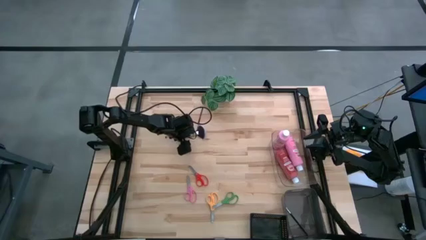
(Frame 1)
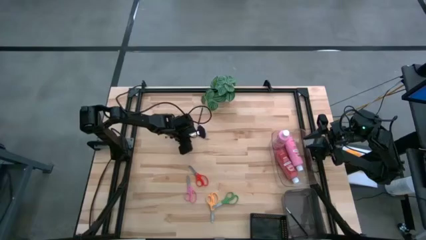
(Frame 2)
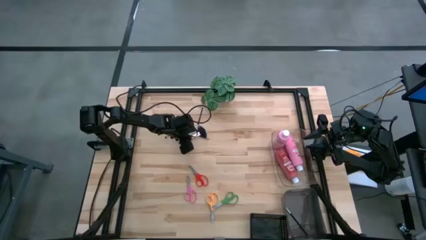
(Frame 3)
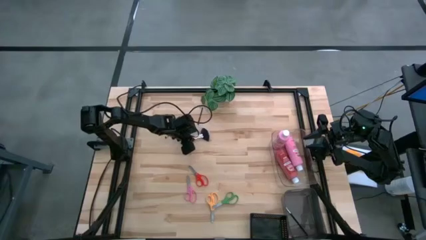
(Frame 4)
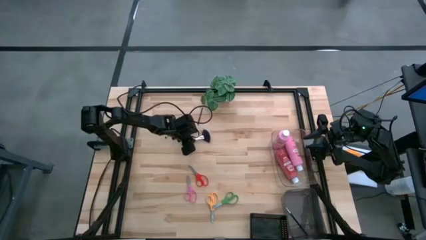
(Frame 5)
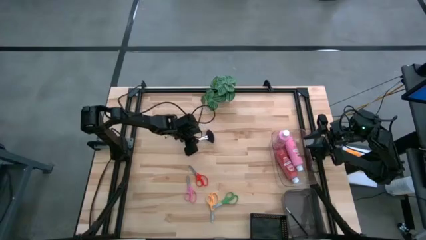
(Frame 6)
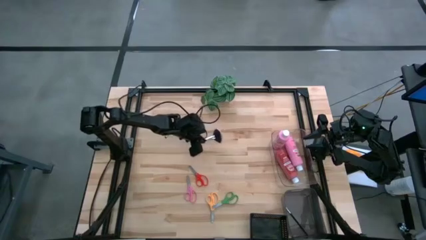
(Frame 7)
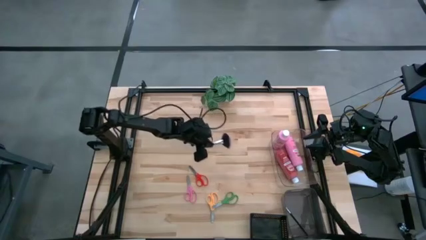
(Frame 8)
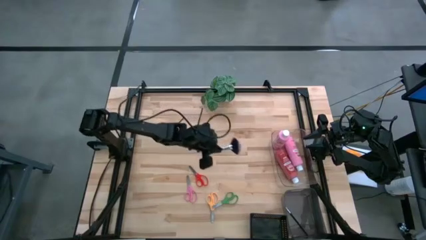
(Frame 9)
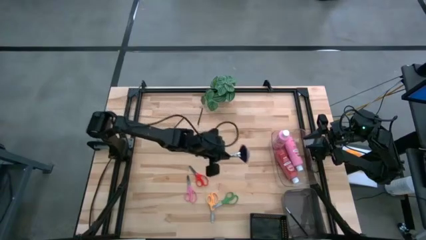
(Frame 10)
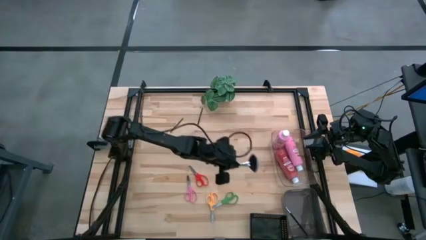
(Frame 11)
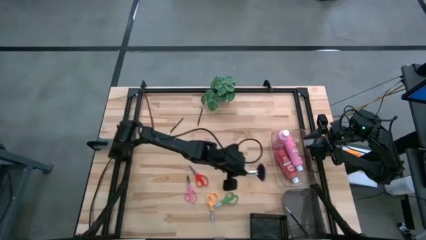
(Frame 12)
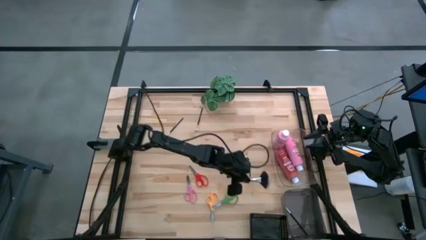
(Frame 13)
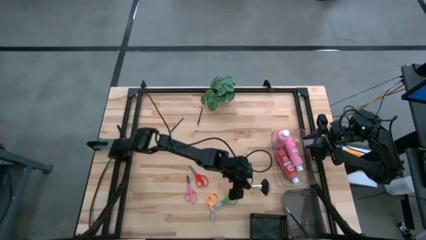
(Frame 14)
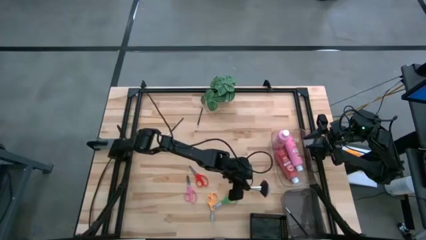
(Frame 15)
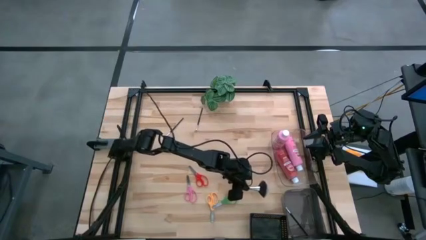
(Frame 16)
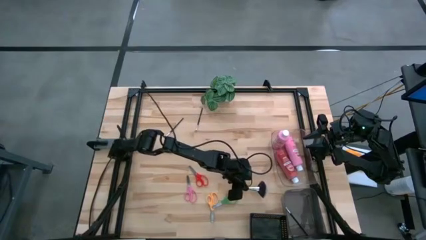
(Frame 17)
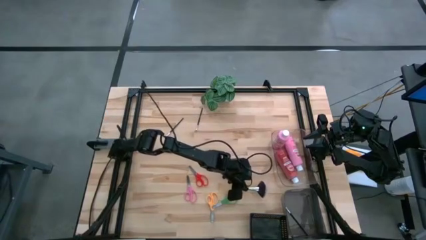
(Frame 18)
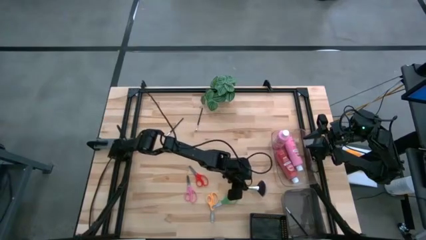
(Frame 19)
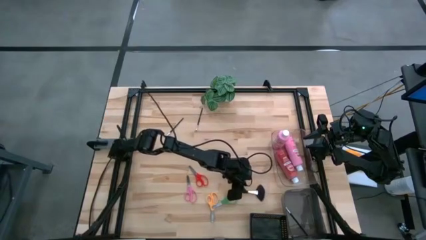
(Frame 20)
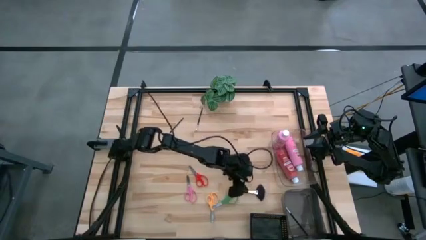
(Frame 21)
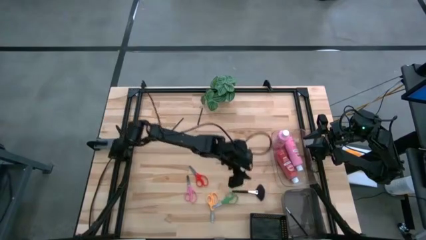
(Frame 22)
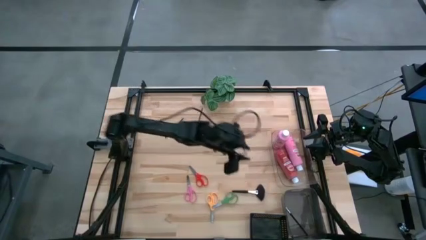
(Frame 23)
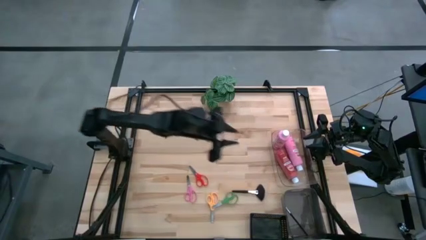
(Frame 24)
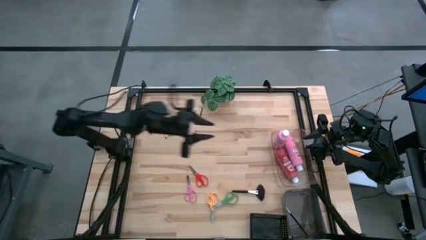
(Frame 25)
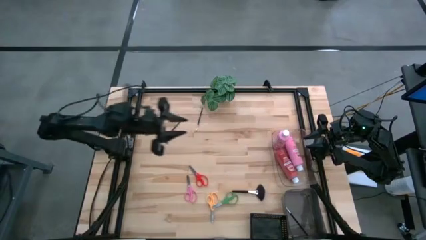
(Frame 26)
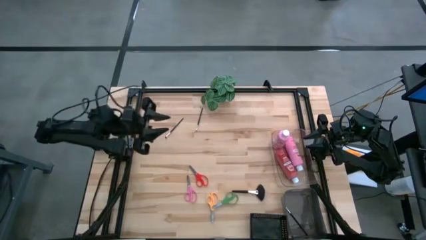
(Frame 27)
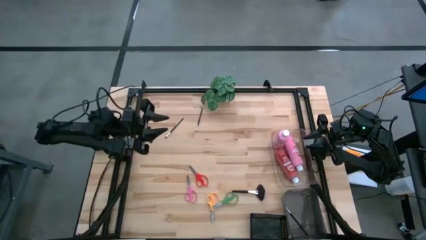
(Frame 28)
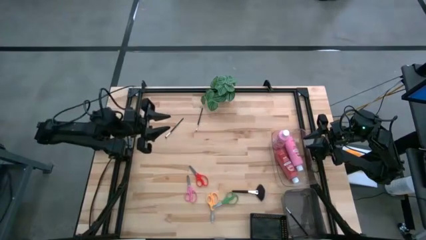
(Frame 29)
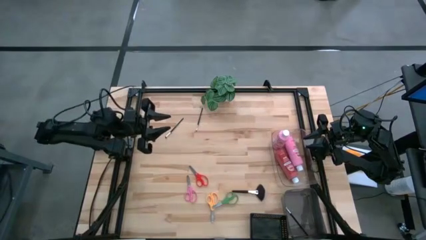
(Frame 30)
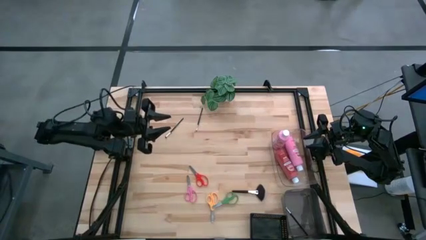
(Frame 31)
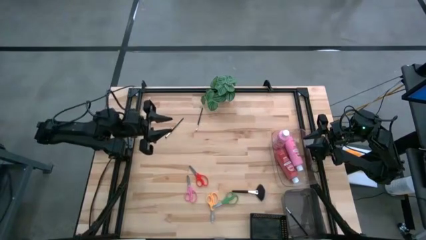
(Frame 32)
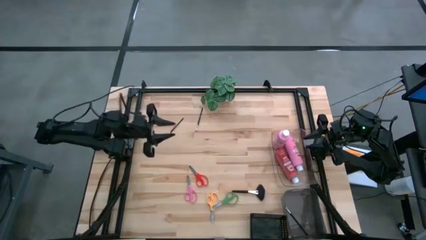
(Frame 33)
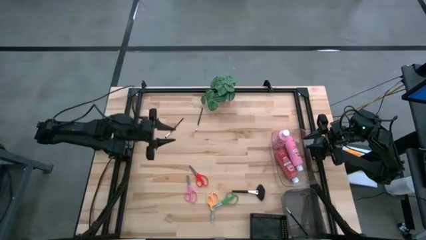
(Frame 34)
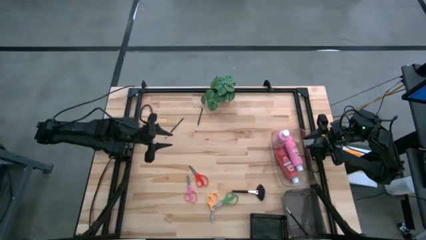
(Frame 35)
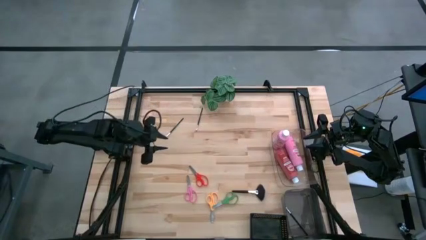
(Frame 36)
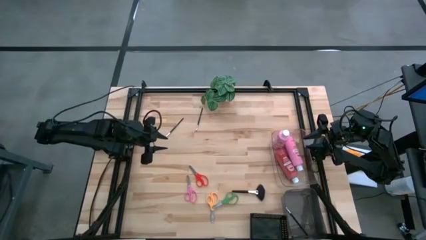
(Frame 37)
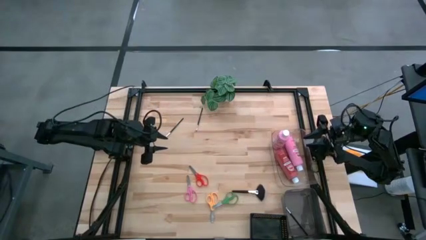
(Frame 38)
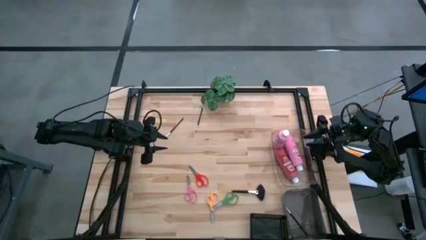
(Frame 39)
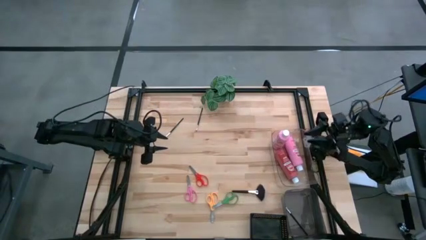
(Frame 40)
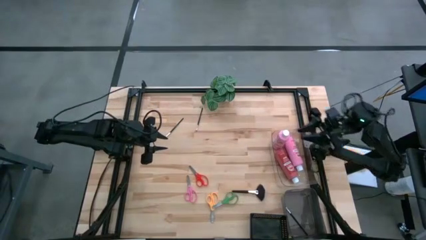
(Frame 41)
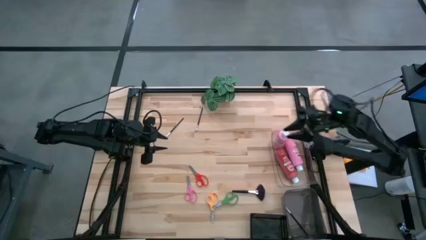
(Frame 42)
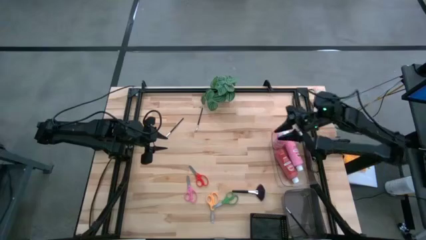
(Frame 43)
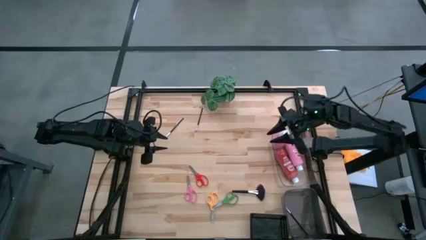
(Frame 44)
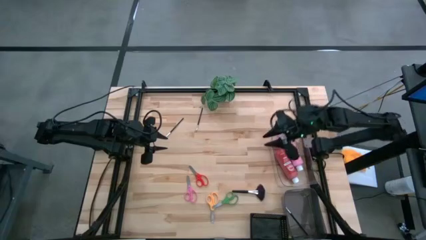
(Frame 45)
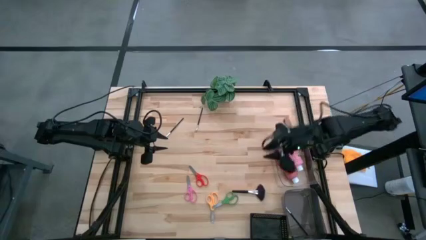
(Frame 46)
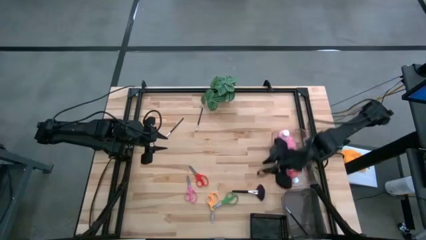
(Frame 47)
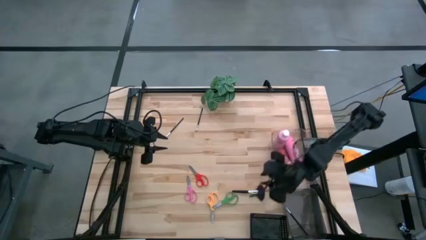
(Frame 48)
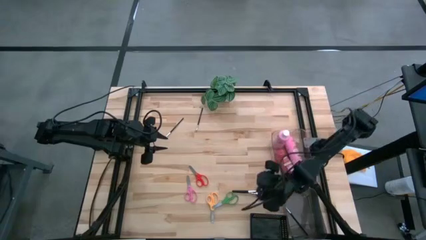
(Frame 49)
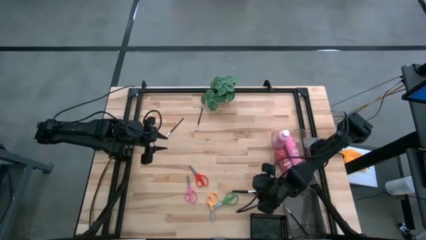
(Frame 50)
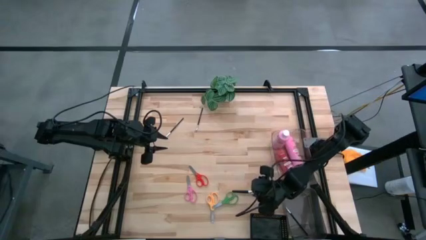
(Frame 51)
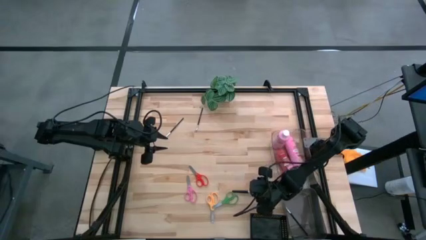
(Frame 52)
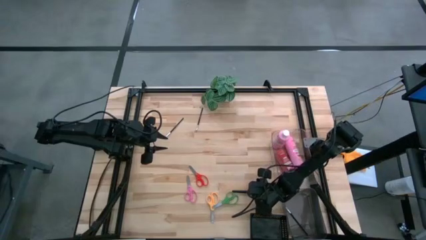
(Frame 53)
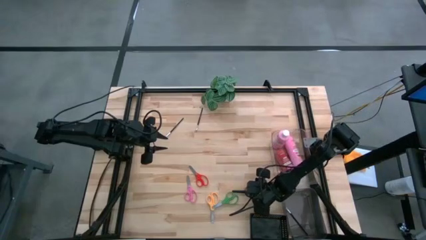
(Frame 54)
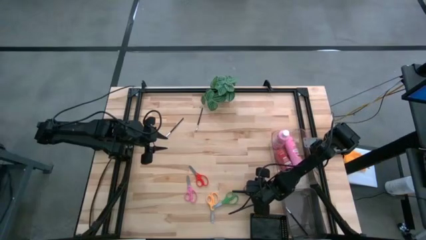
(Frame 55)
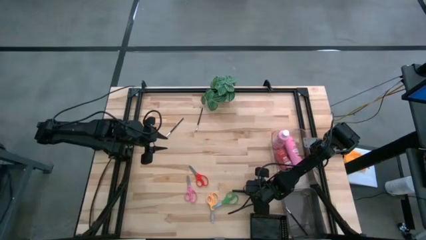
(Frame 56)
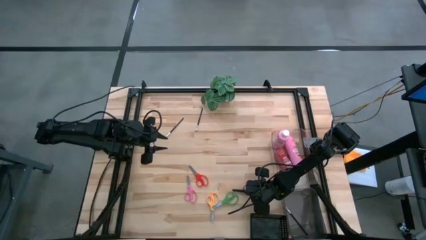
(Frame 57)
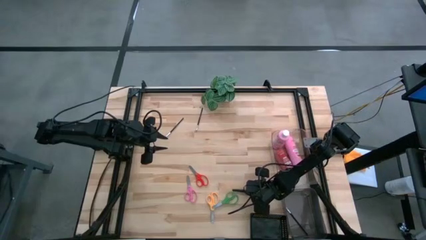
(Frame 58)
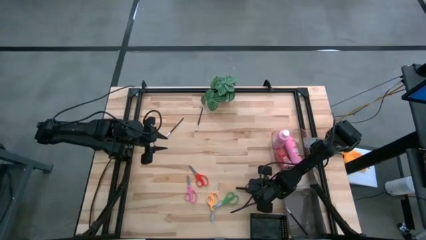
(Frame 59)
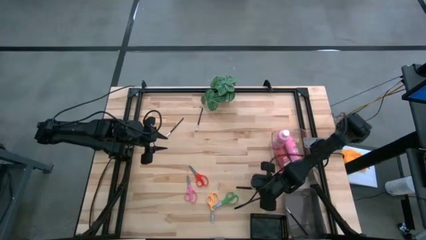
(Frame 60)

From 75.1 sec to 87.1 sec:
Task: Pick & Place Paint Supplies
Put the black paint brush into the gray bin

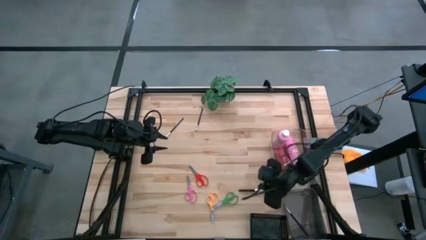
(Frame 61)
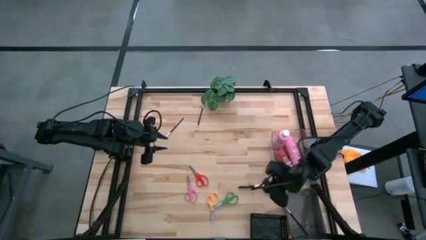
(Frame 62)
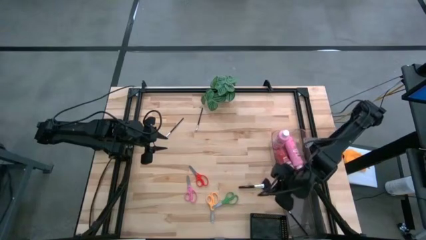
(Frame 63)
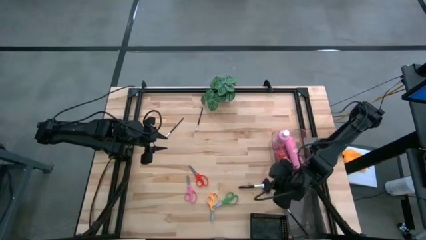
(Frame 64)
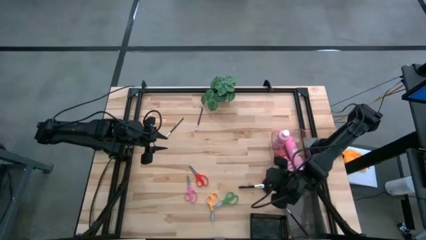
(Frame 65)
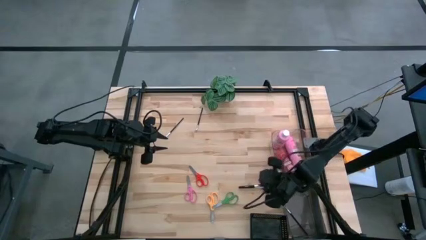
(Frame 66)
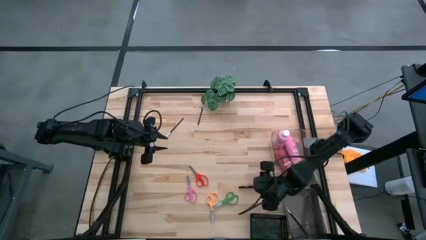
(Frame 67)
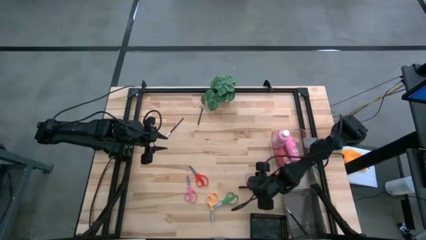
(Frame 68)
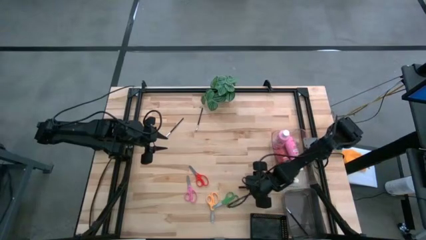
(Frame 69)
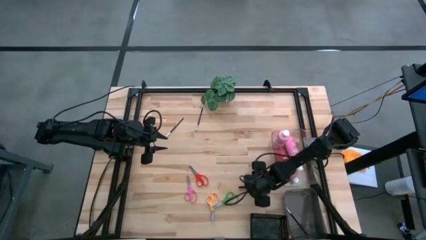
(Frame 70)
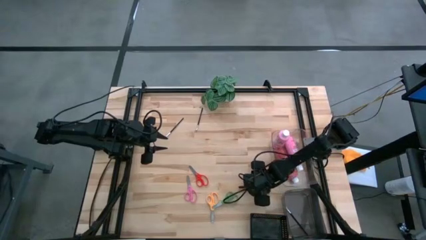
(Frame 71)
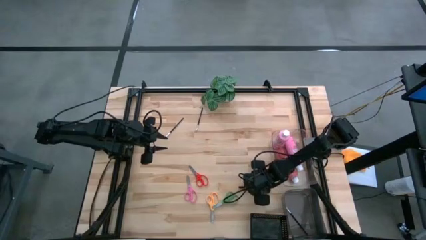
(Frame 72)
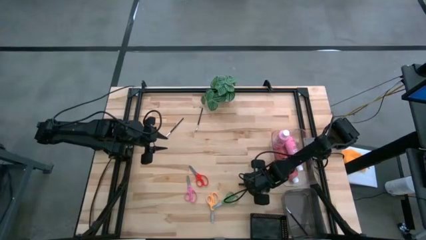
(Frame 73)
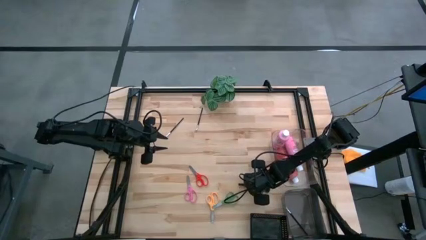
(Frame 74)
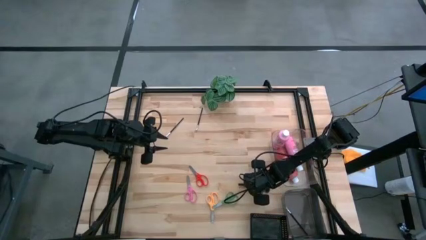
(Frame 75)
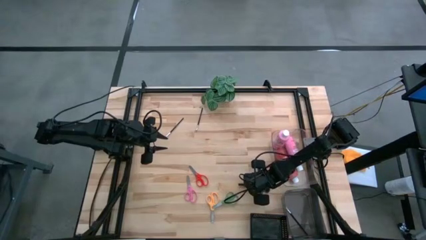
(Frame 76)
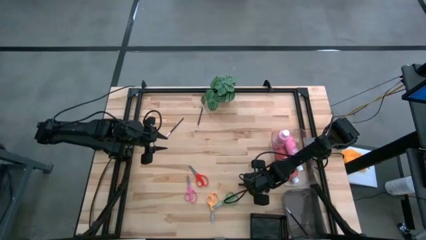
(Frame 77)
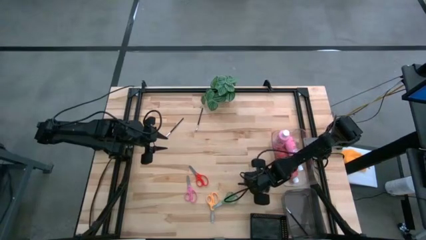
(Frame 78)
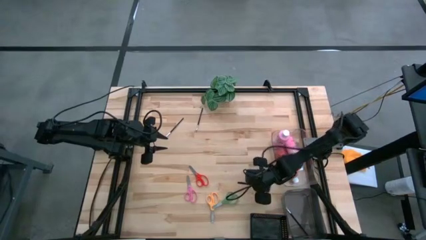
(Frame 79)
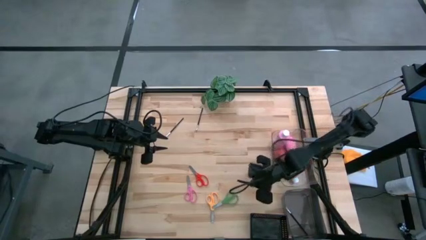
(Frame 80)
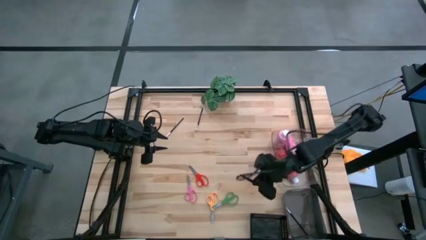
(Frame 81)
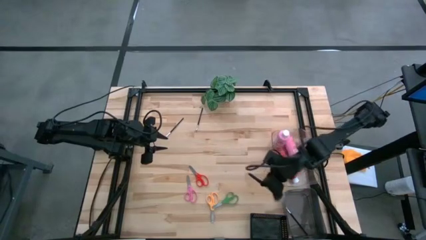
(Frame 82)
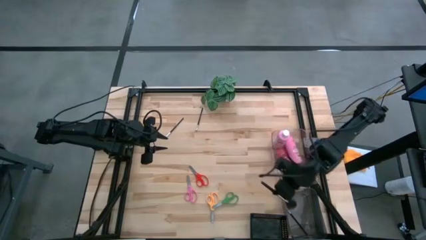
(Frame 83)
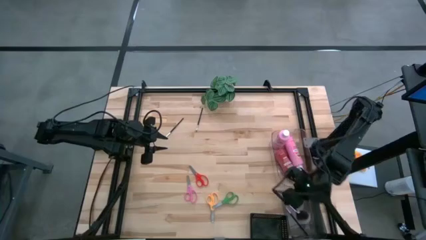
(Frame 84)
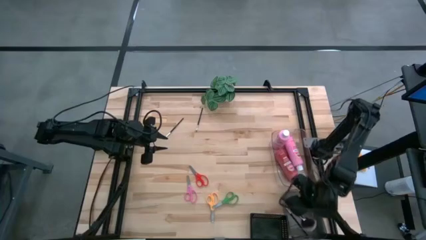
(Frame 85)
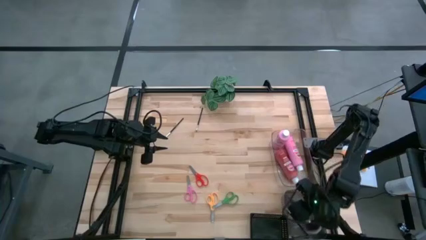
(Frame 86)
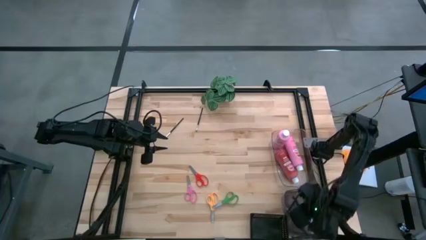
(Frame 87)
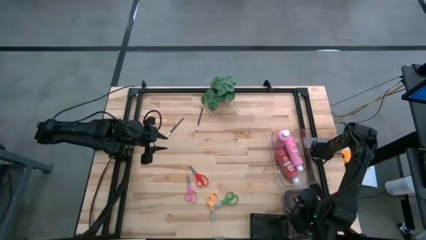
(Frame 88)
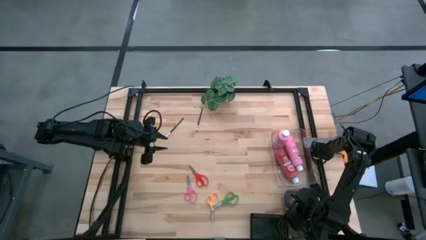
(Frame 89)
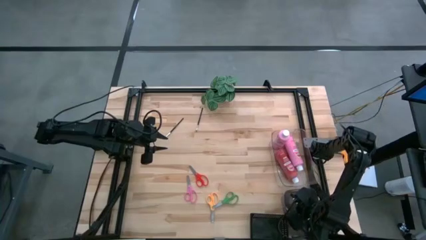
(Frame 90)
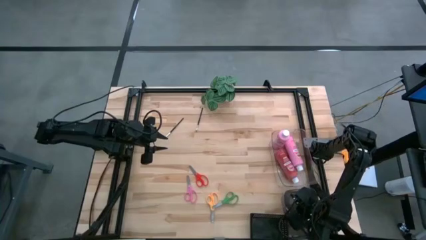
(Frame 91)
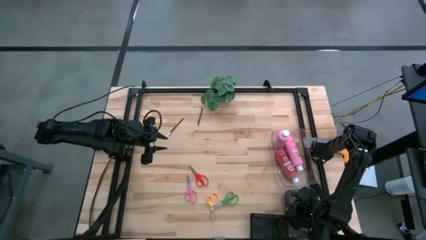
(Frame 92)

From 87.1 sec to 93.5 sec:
Put the black paint brush into the gray bin
